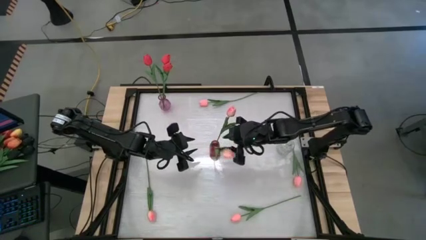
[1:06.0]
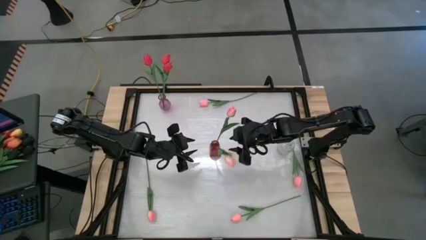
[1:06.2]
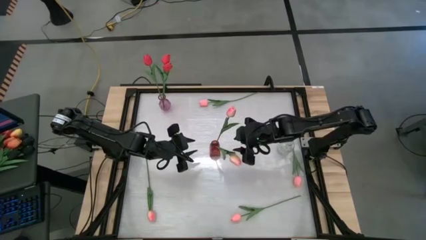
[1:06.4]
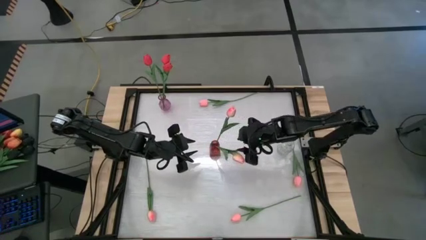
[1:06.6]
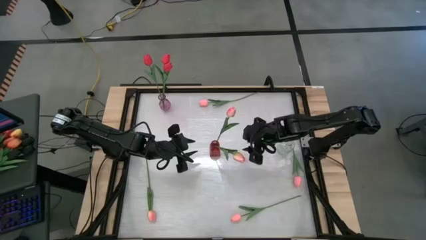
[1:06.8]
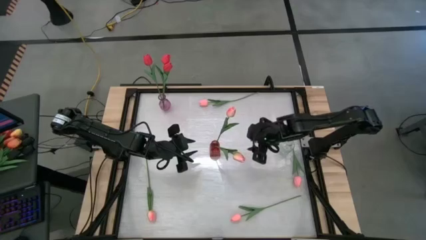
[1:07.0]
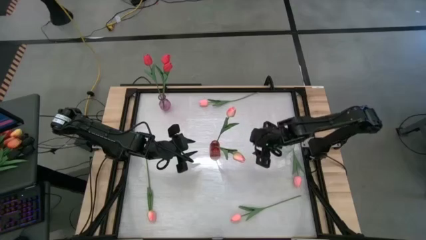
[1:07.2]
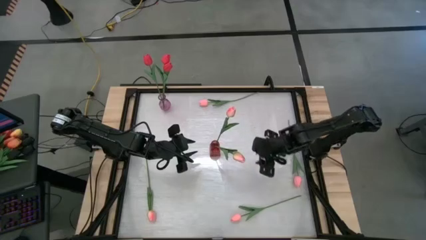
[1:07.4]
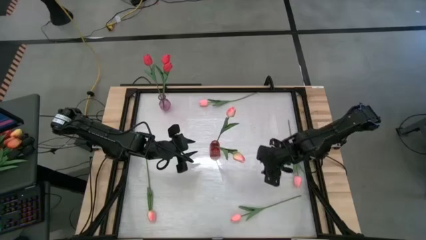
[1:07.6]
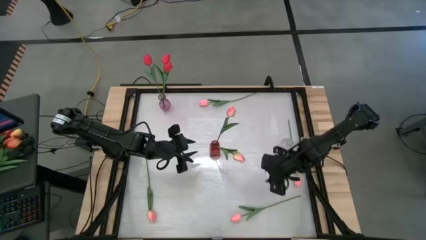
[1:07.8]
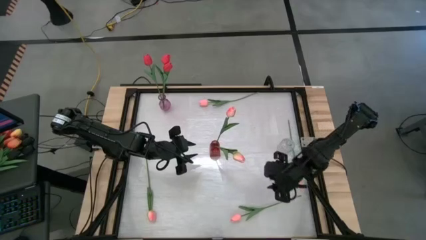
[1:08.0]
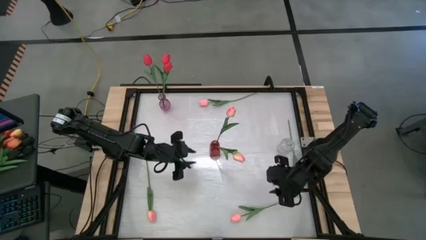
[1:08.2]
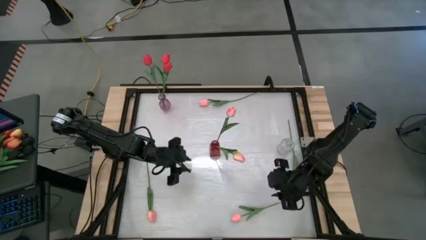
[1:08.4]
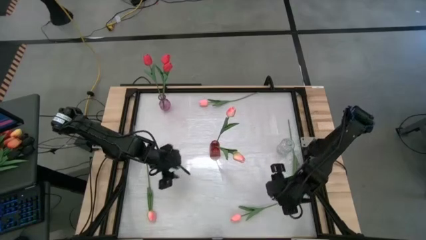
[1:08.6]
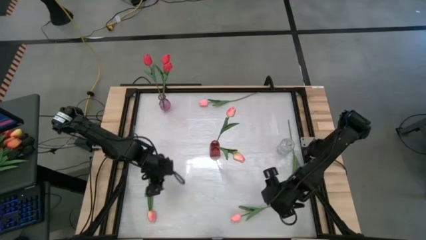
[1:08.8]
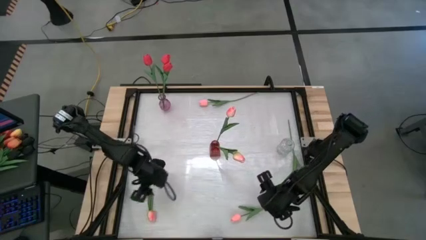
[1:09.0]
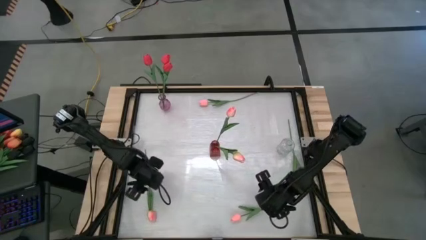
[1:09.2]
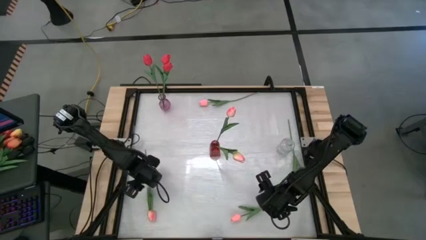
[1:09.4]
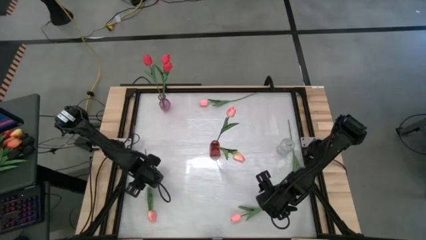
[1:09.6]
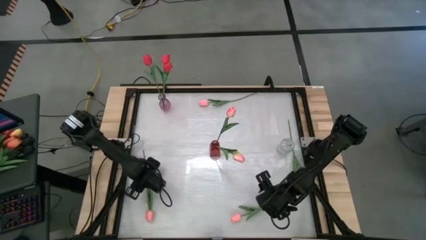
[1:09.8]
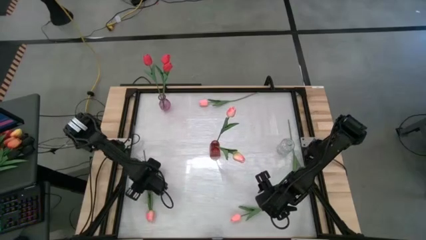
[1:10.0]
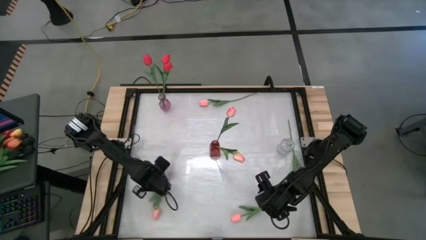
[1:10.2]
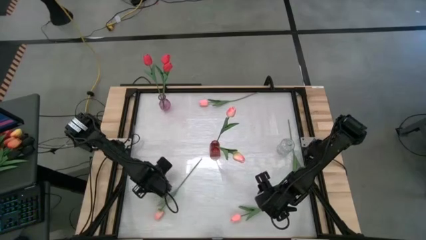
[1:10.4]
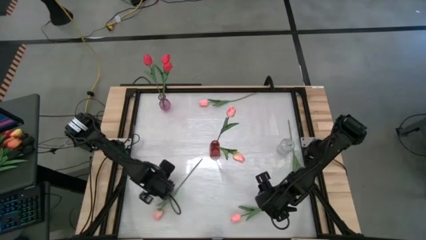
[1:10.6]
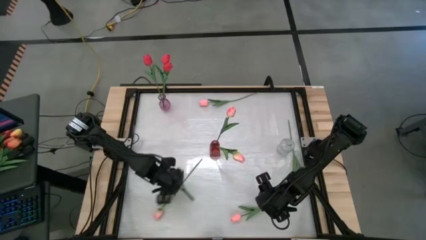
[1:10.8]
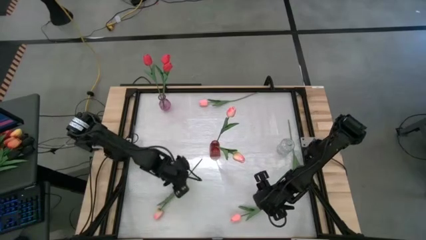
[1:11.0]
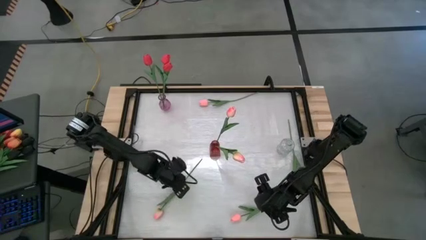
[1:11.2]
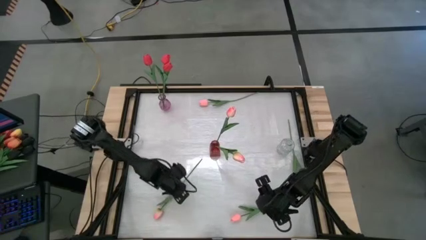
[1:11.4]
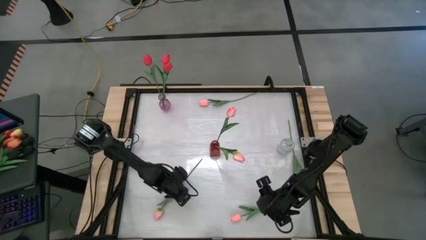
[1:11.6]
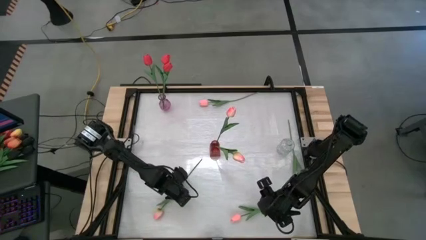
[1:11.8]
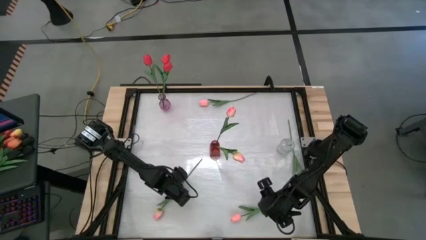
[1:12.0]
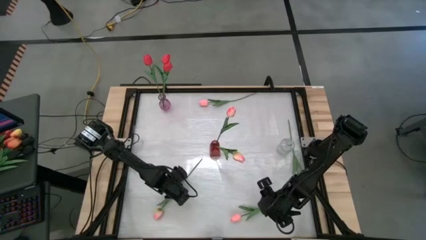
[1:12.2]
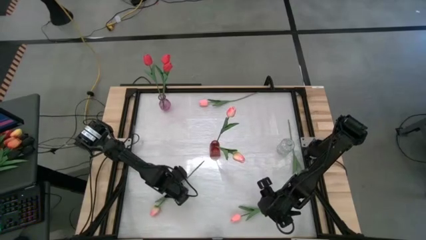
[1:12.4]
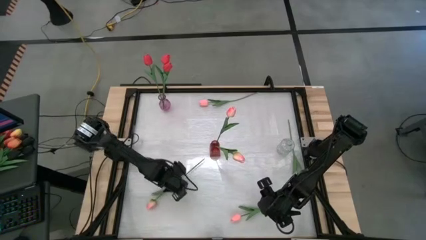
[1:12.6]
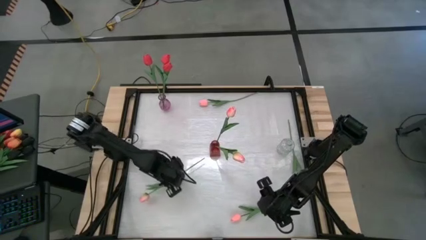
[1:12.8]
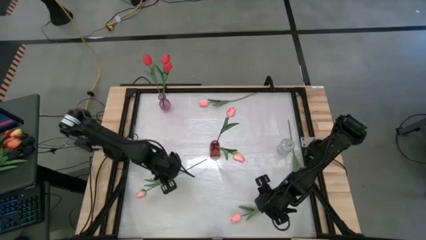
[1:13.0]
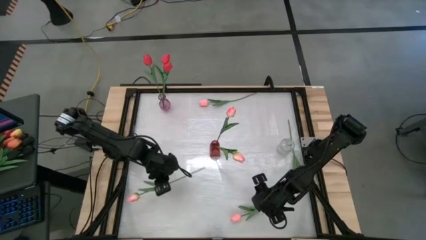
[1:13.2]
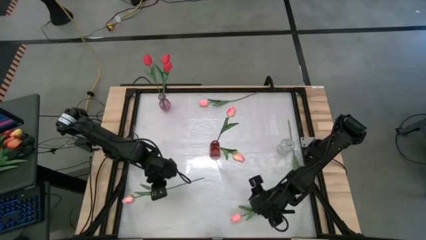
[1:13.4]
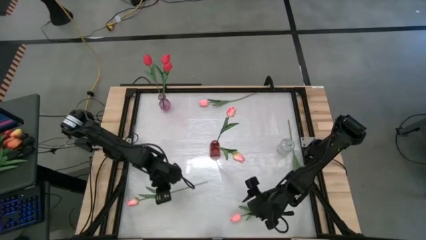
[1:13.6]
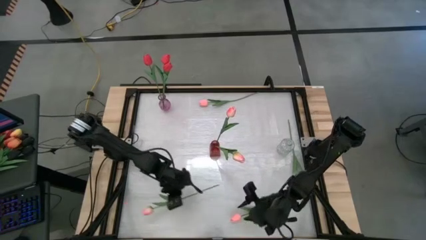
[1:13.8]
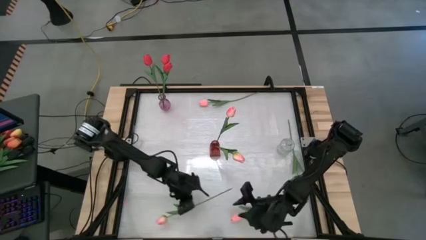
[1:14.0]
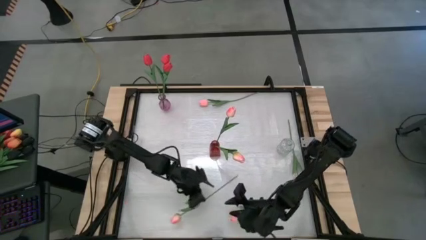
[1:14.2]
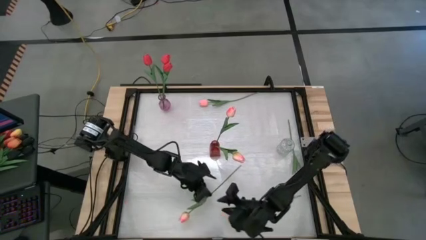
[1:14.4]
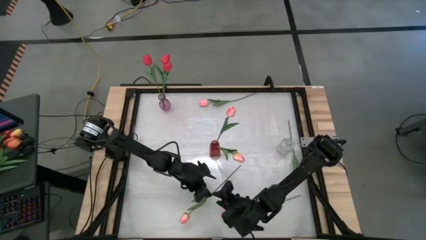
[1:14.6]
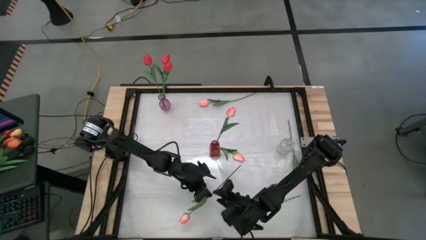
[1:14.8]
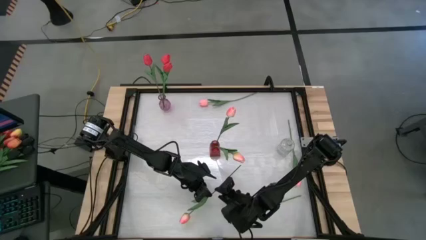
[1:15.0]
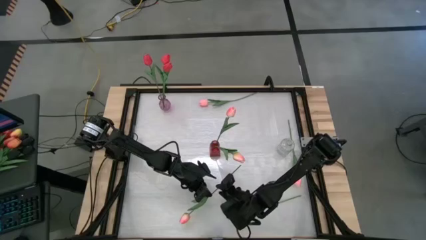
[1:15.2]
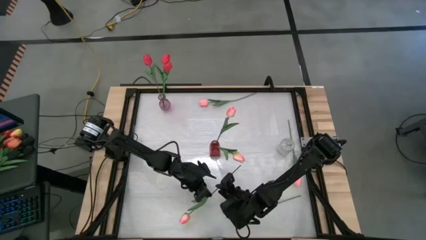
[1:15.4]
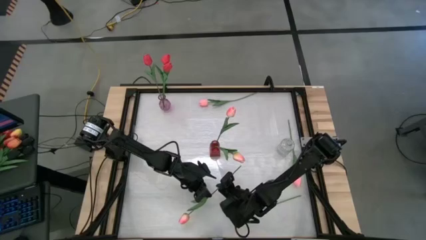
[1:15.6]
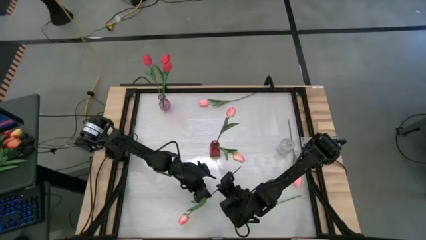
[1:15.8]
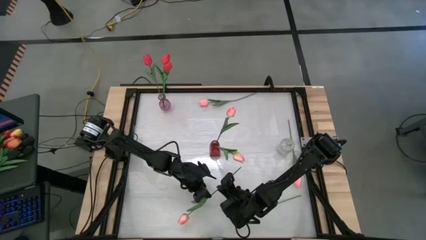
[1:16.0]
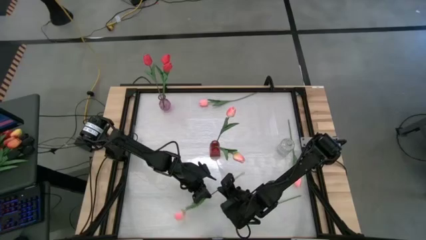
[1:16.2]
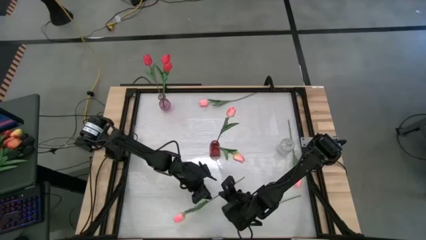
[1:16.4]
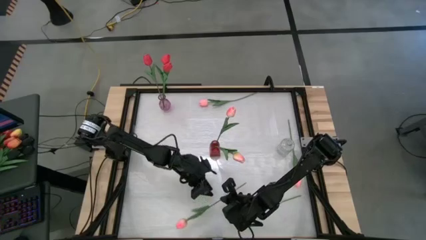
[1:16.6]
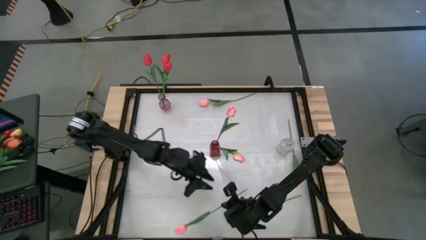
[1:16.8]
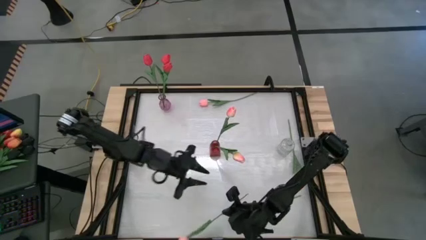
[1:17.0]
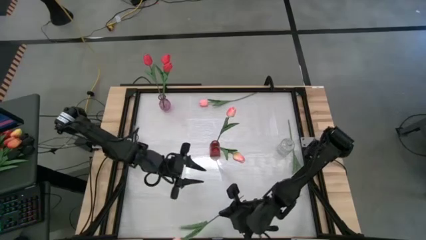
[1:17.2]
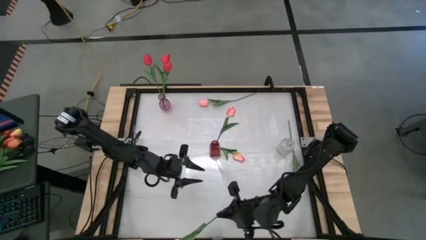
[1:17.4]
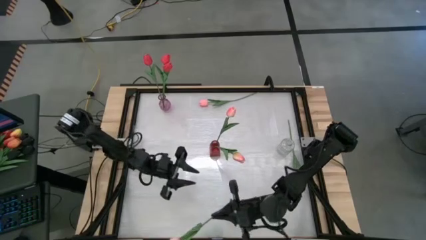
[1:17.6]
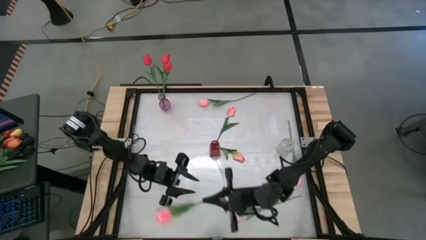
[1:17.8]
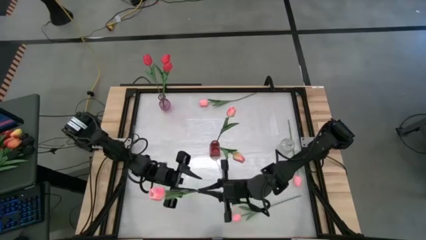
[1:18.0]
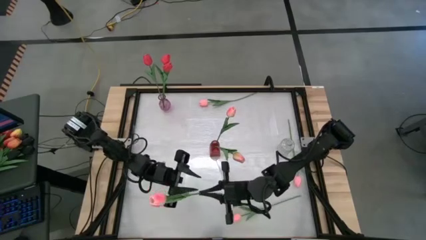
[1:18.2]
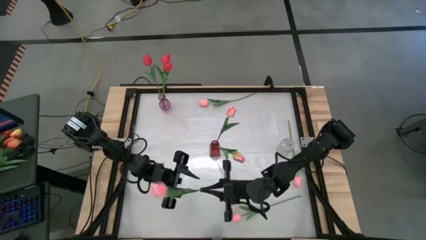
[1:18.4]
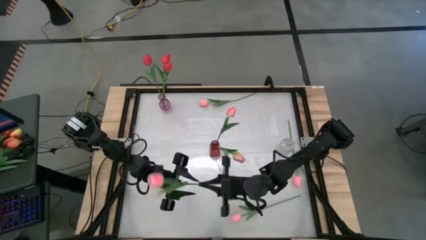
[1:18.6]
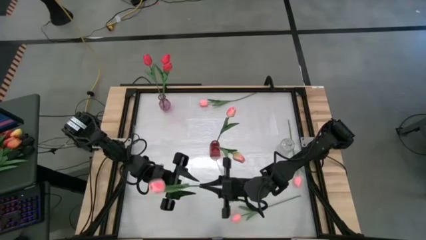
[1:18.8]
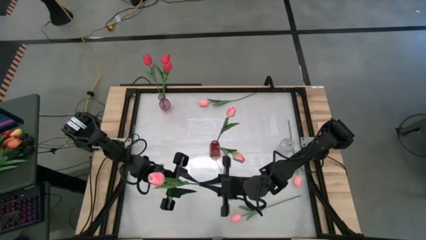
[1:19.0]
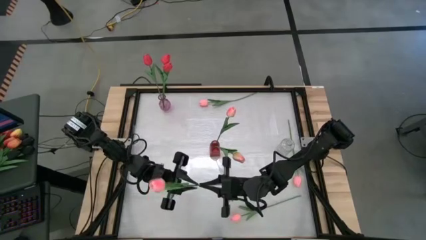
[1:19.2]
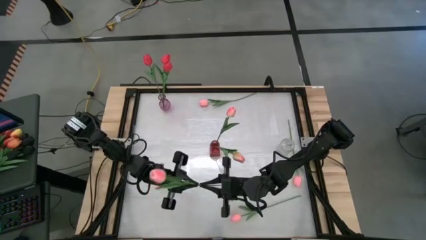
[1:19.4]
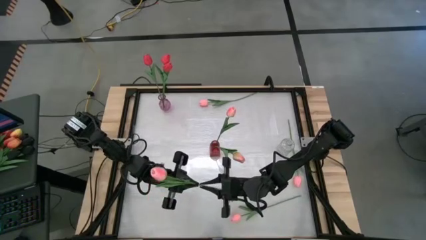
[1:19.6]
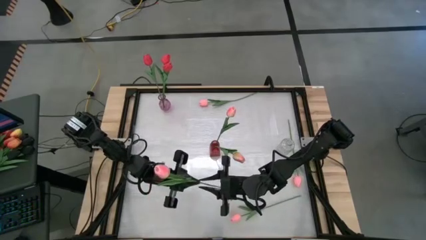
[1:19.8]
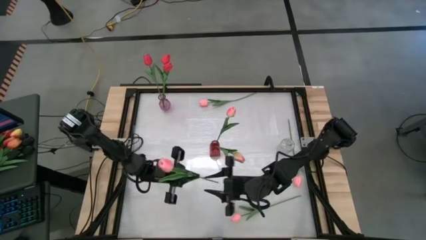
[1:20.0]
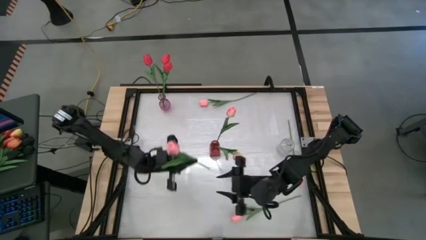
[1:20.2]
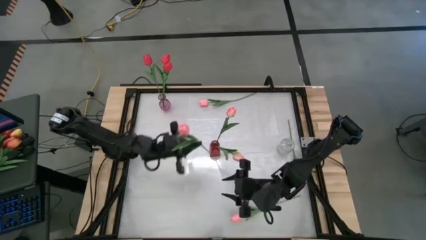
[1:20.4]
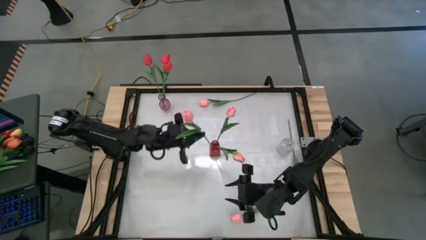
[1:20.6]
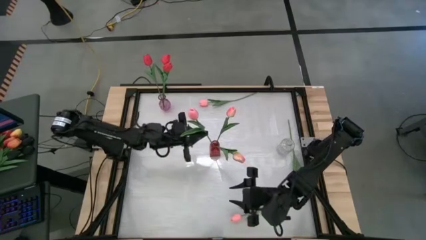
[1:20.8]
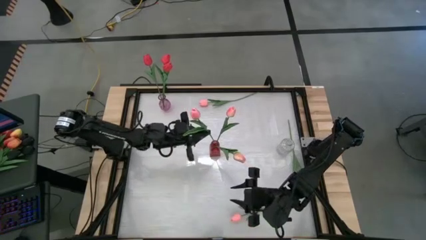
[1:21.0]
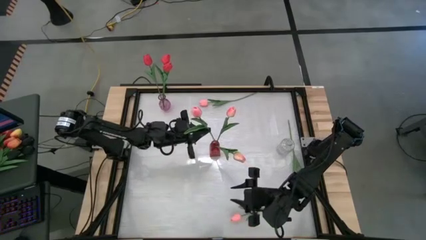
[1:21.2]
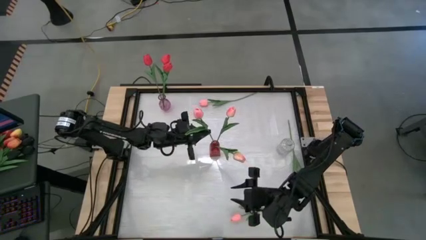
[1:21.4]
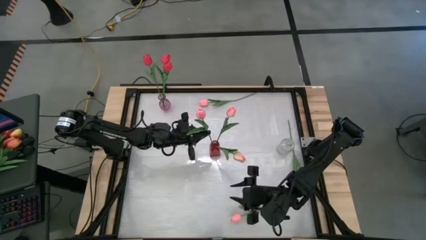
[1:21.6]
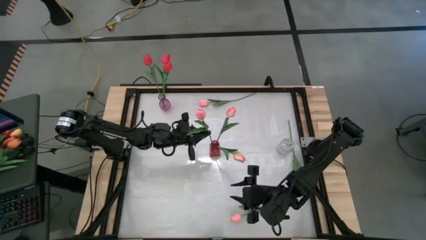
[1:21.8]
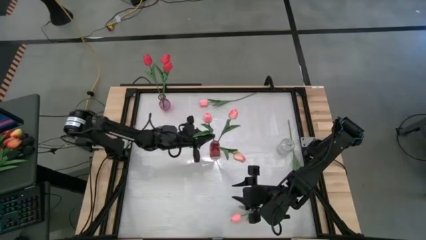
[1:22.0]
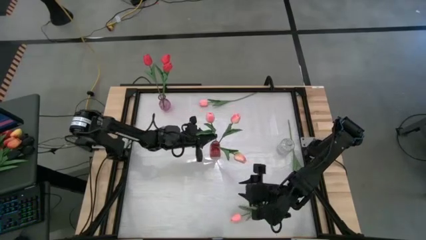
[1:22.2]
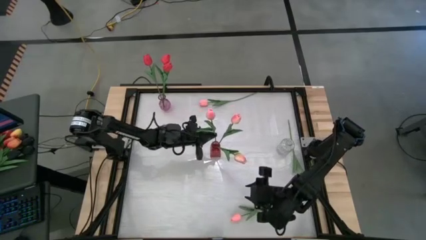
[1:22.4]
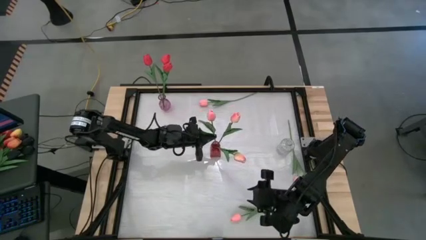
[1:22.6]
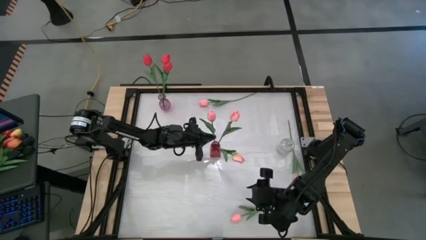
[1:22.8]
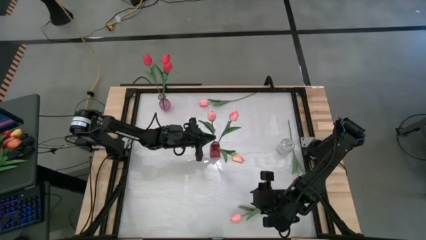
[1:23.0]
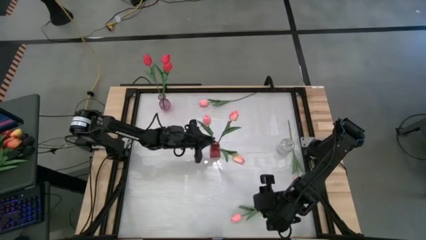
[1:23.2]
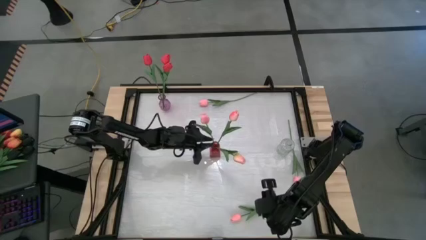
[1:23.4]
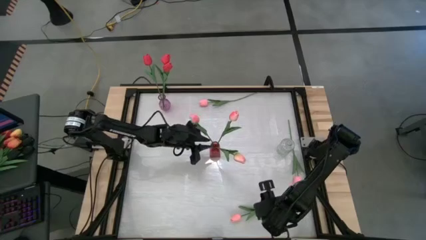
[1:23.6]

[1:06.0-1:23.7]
Task: Sort flowers into vase by color
Put the pink-orange tulip into the red vase
